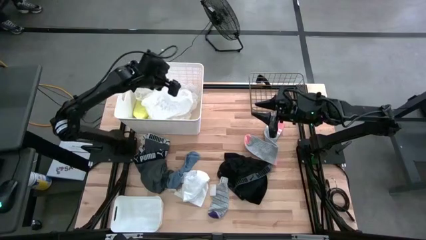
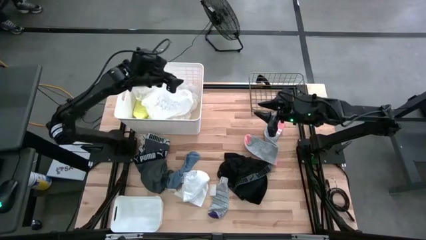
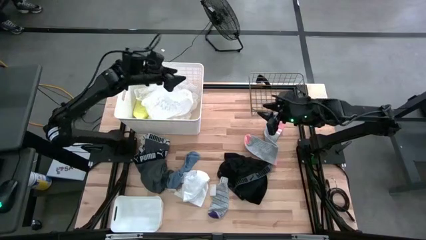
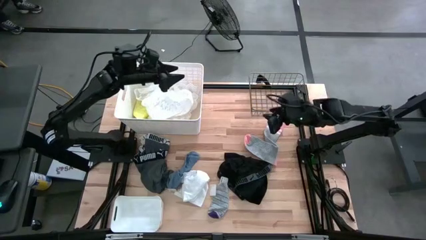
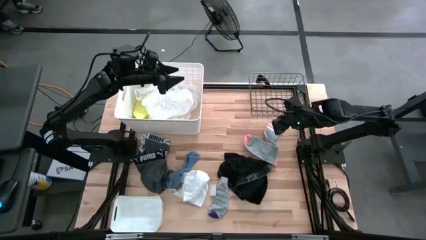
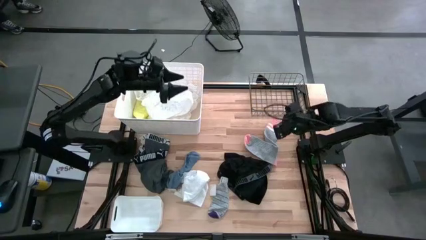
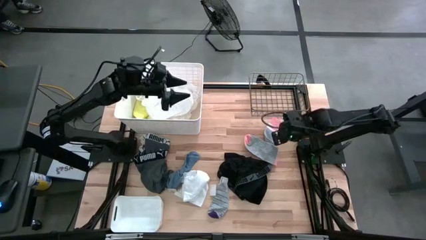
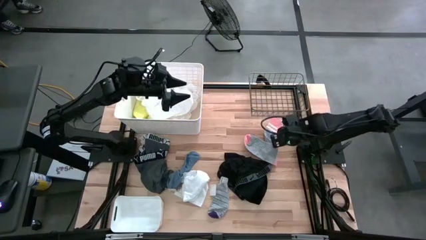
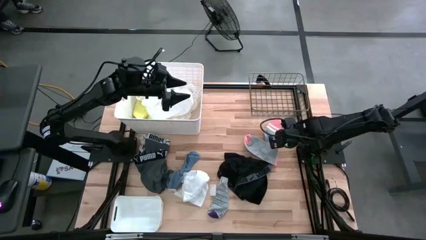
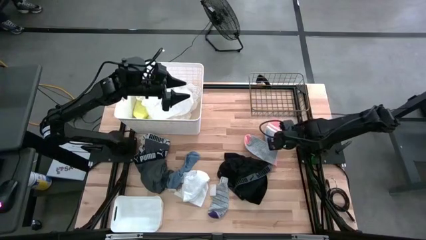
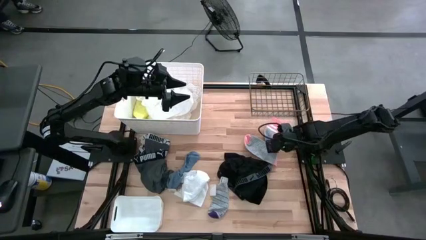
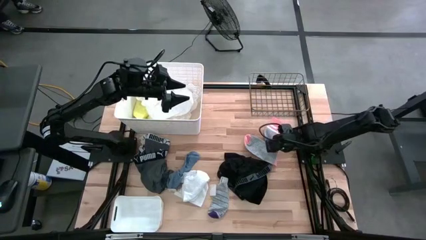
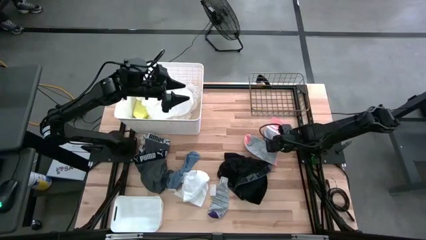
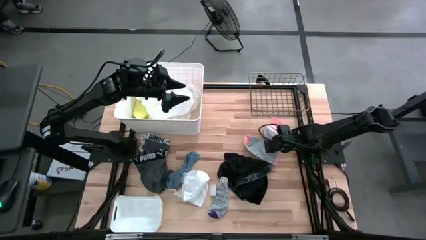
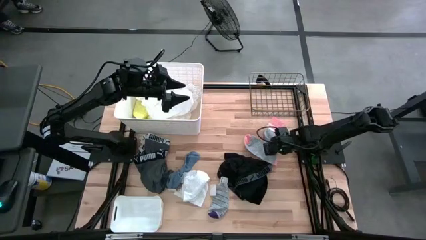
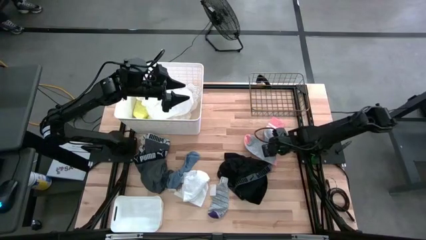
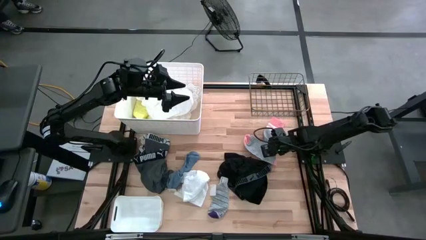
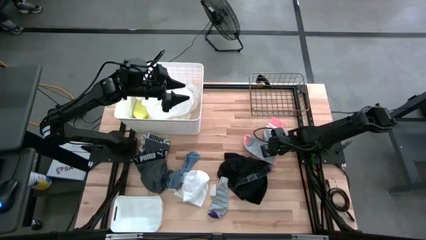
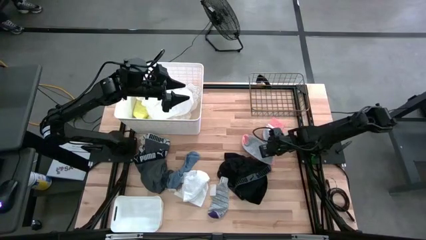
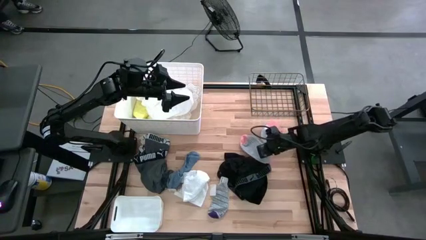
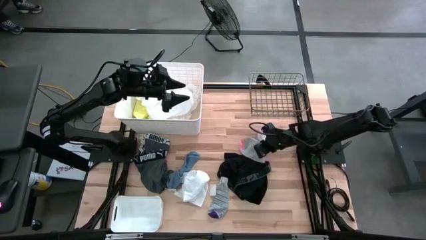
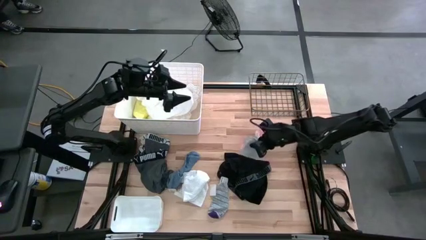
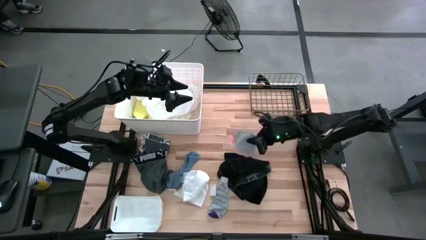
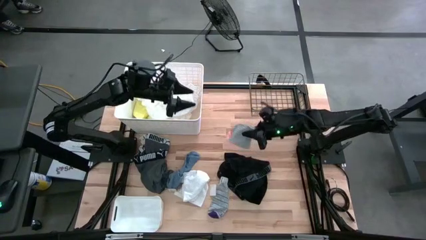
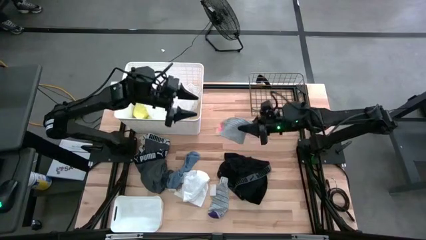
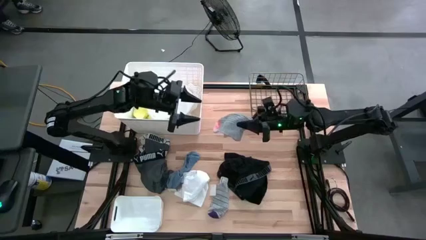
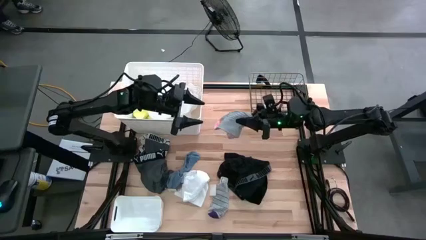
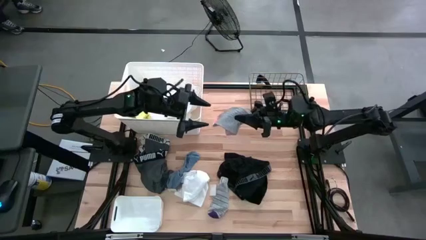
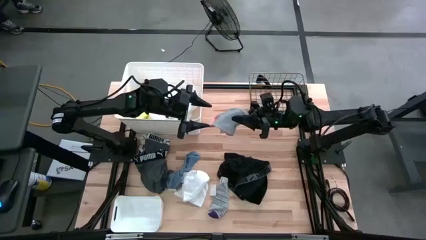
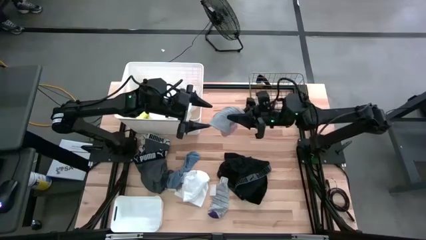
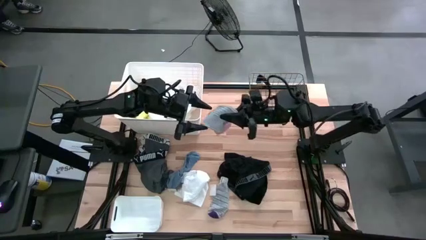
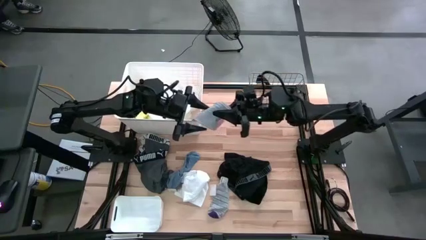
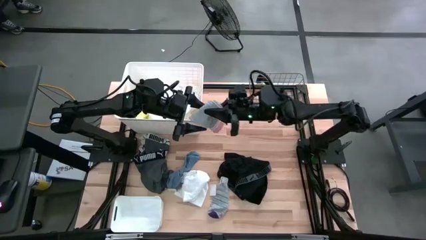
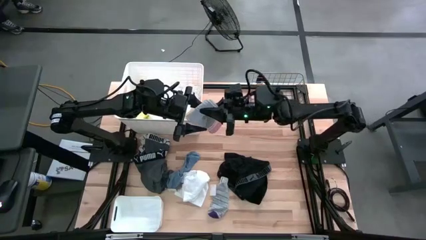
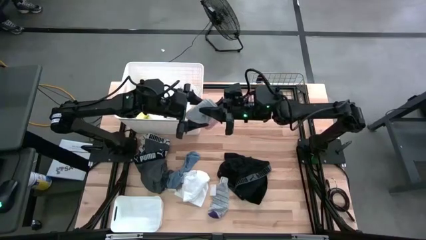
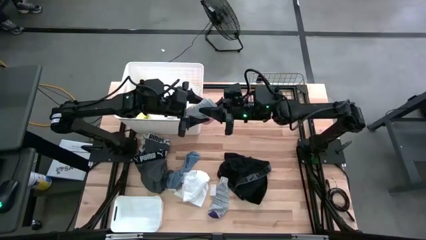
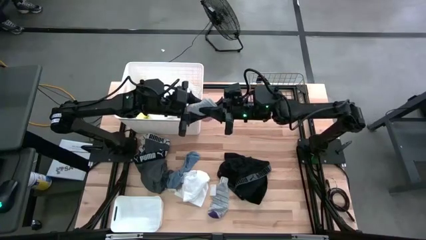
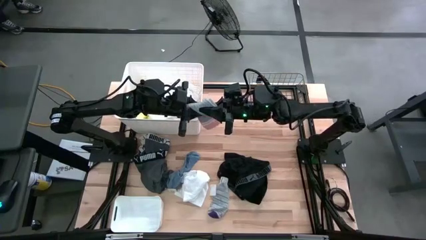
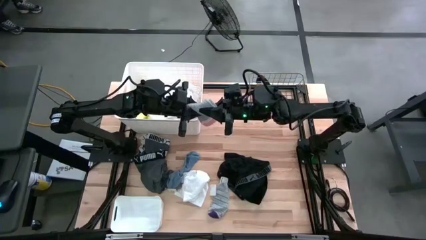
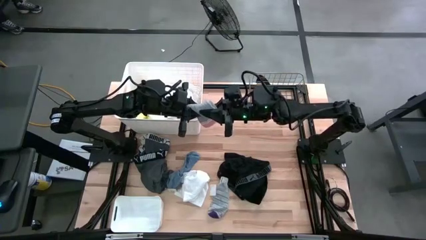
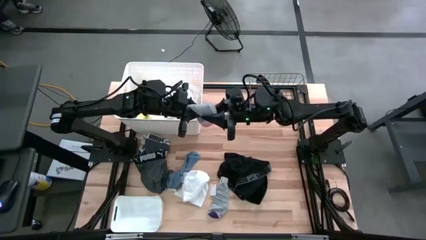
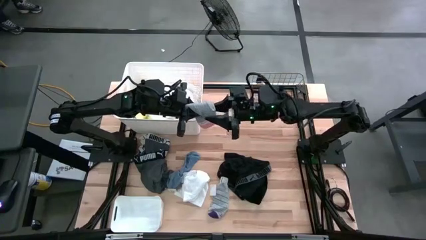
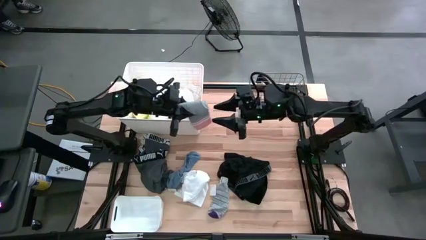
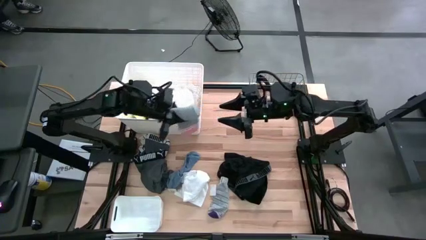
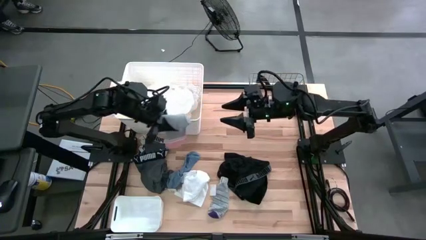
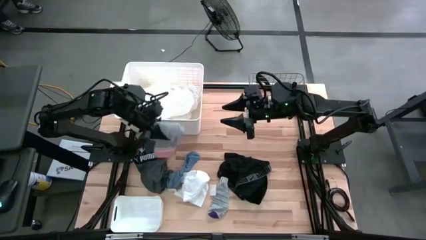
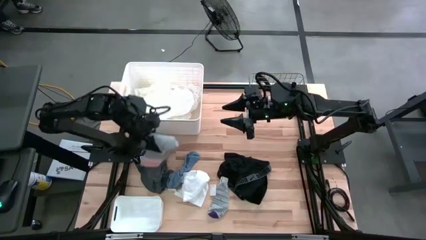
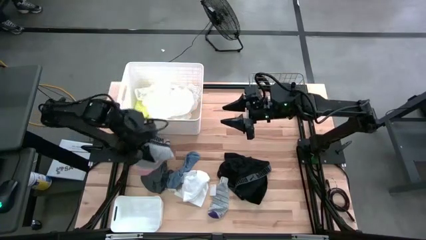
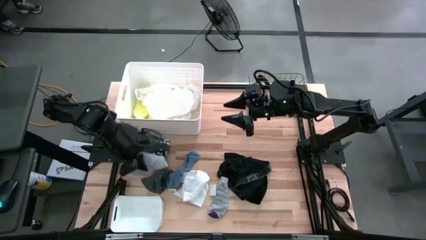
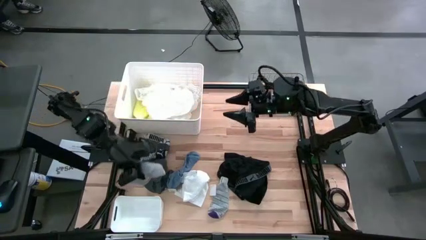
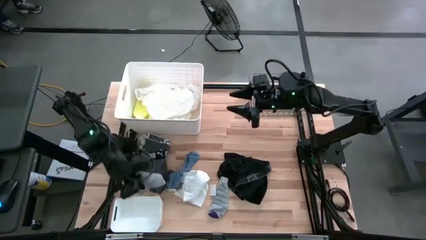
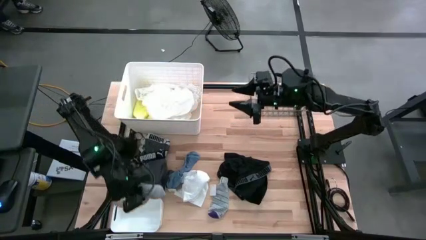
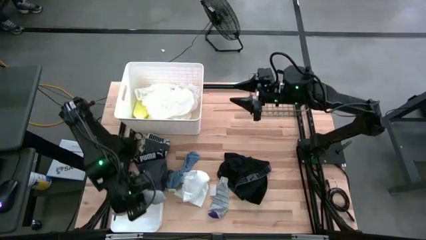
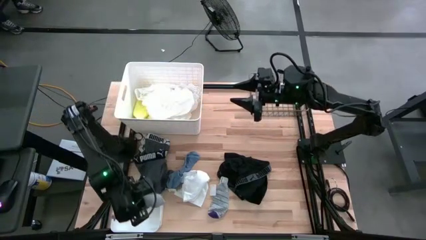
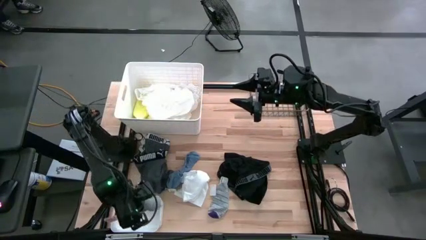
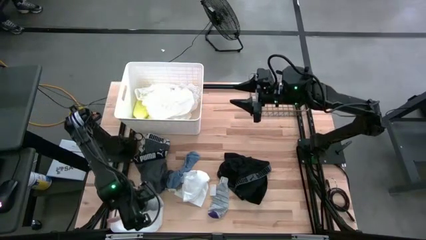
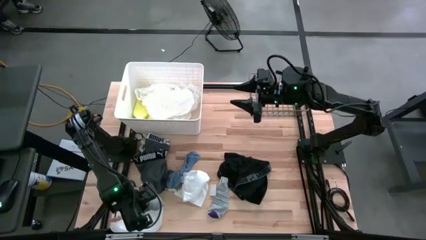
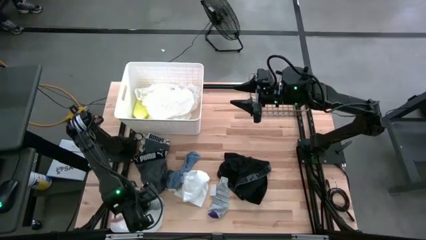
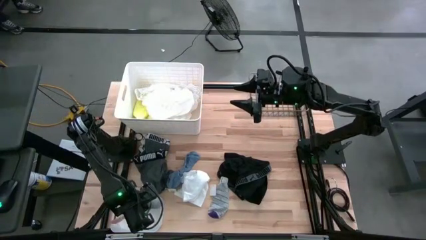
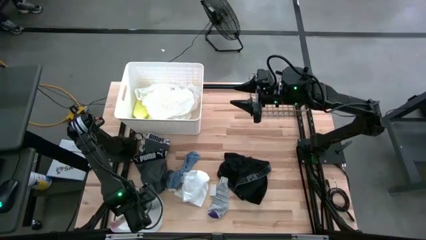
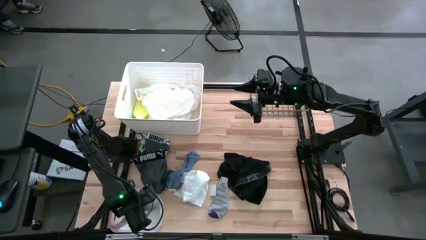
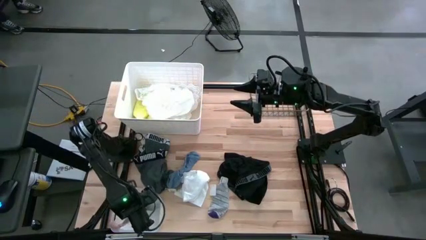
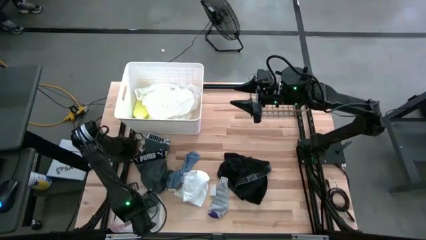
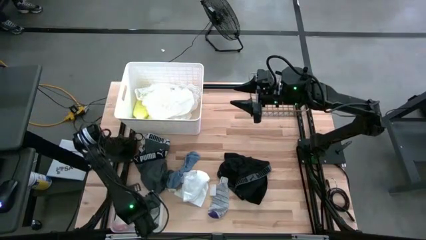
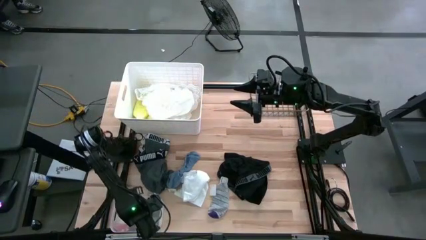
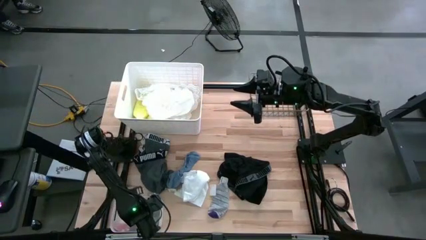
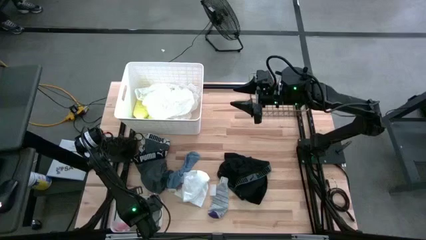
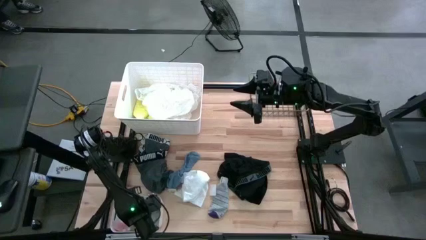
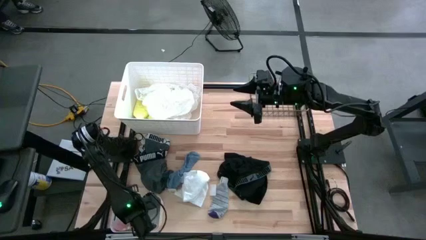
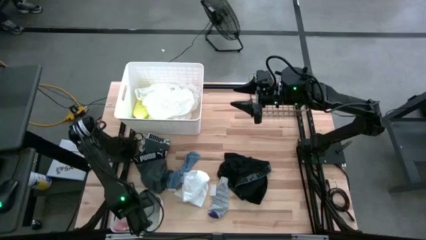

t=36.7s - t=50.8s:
Task: Pick & Place Cloths
Put the gray sock into the bottom white bin

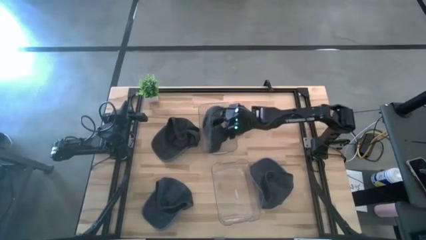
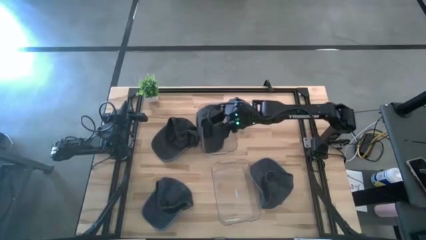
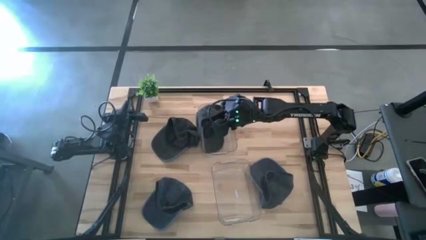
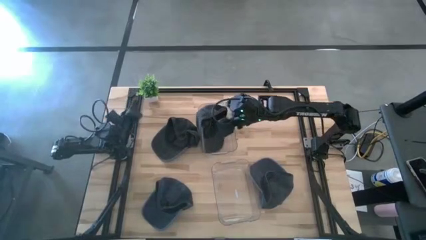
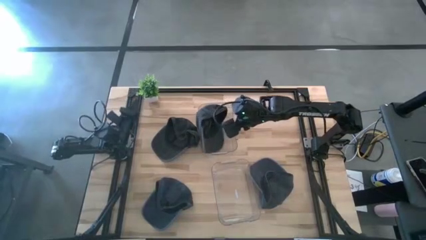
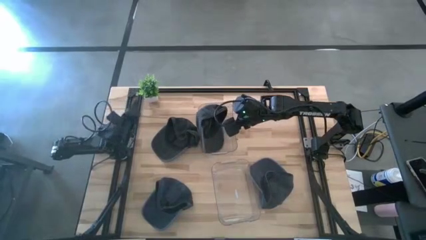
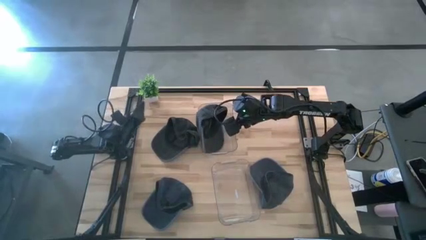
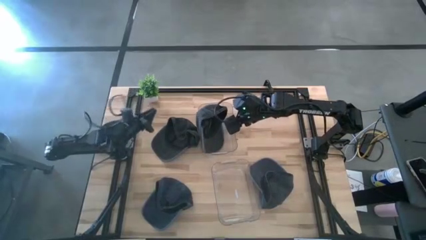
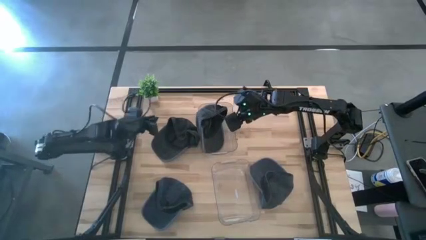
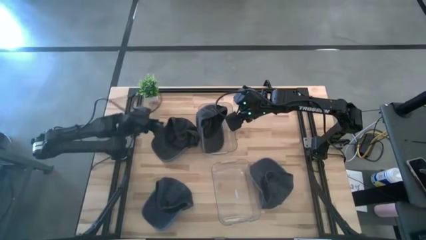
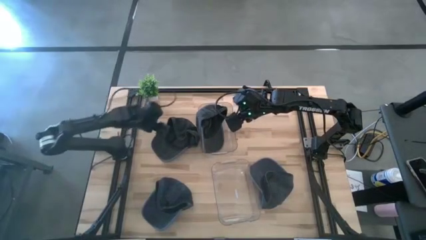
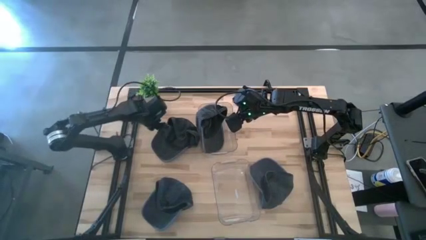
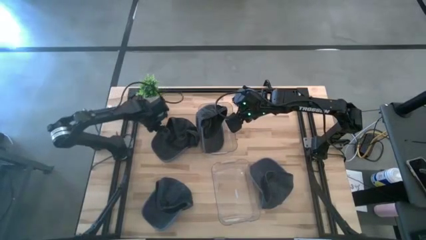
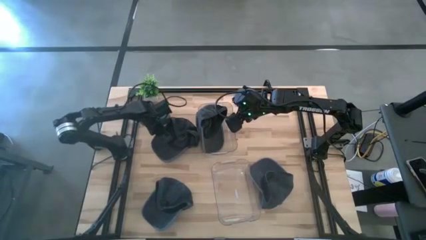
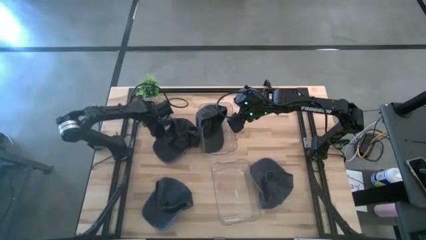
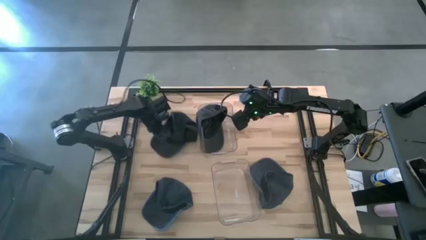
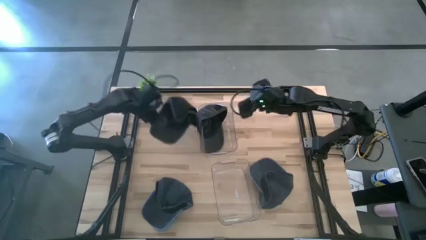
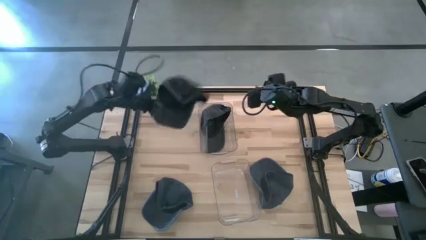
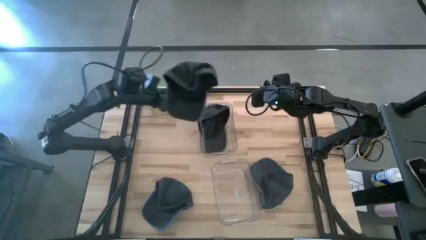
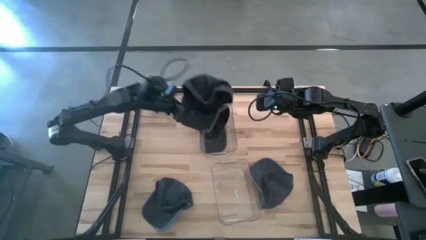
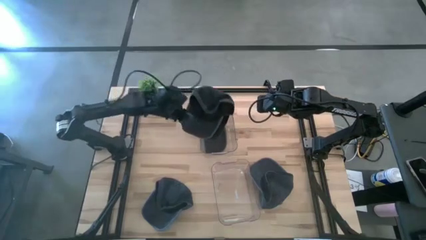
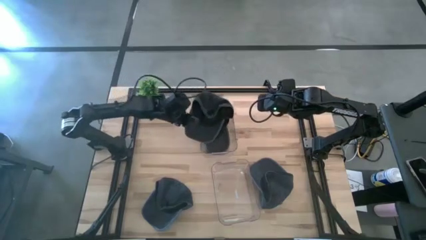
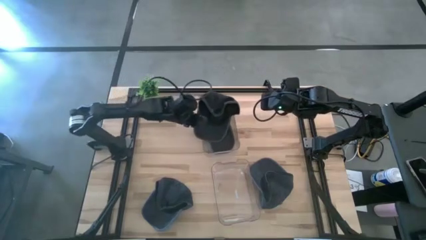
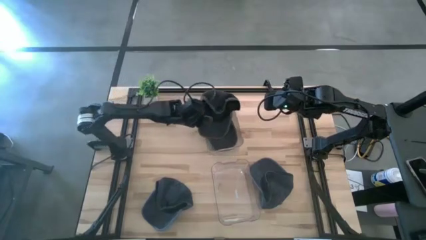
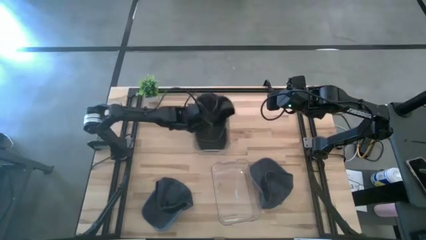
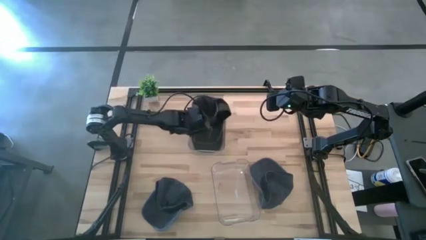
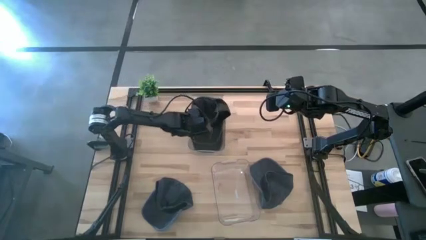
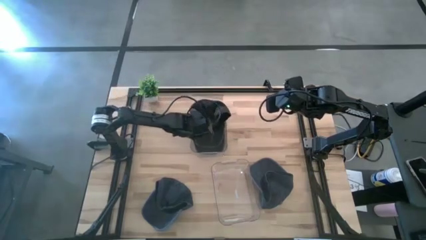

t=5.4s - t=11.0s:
Task: Pick & Place hat
Put the black cap into the top transparent bin
